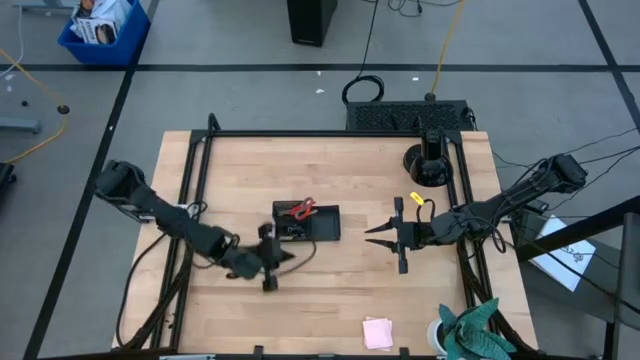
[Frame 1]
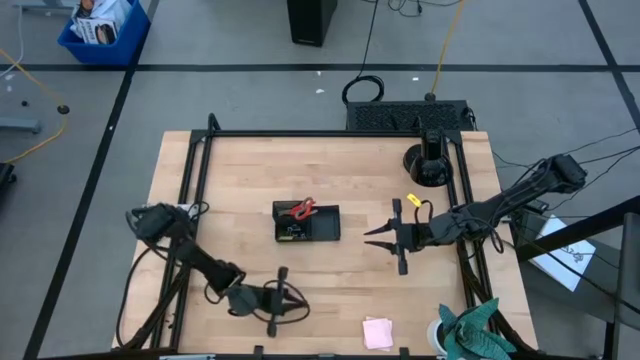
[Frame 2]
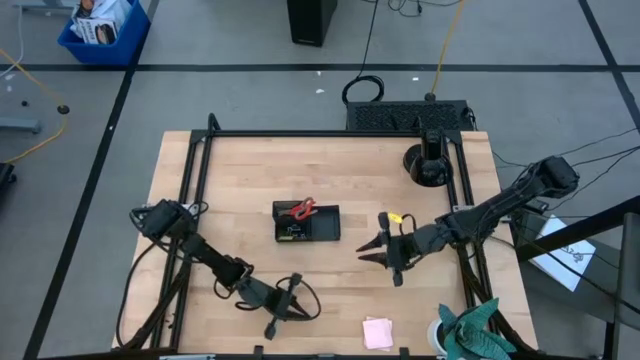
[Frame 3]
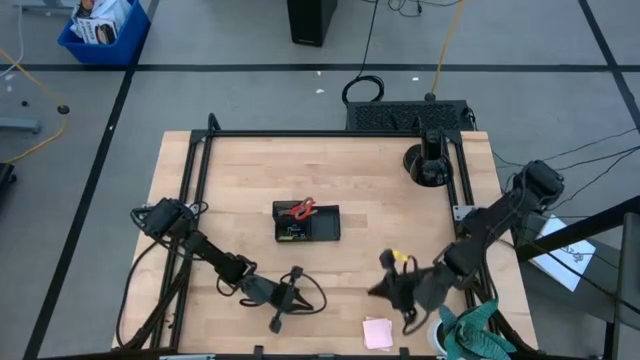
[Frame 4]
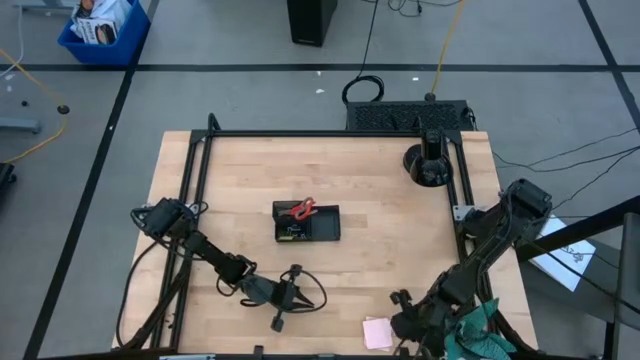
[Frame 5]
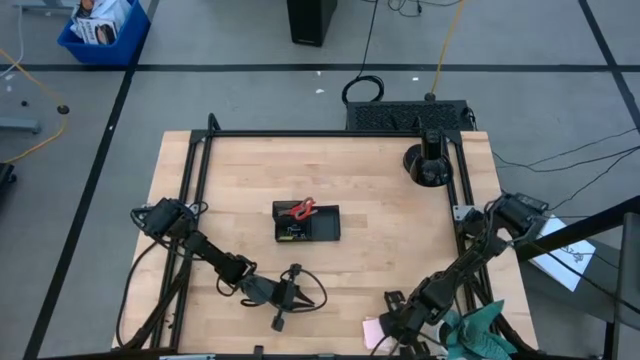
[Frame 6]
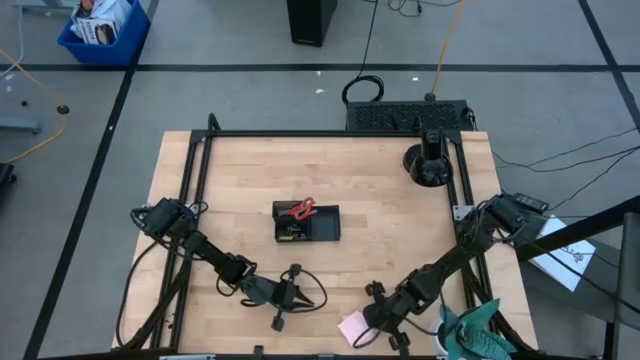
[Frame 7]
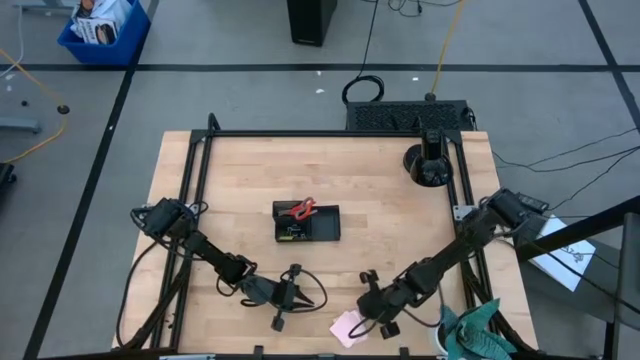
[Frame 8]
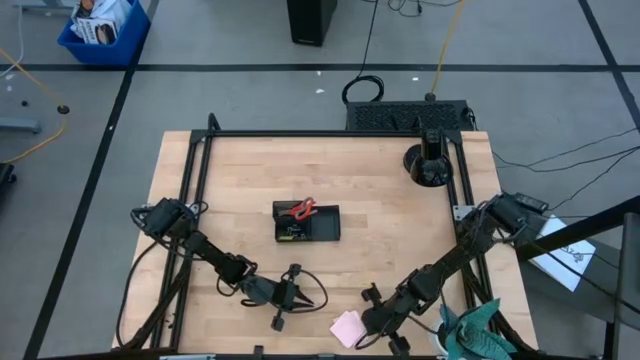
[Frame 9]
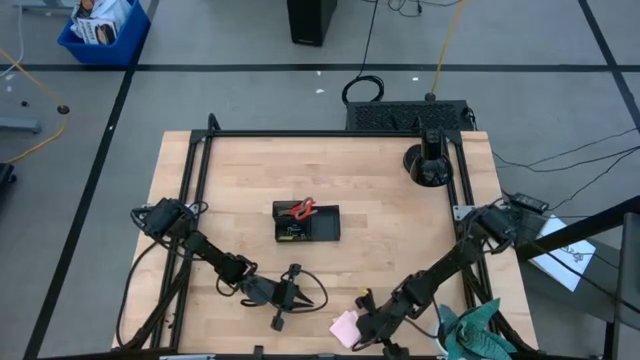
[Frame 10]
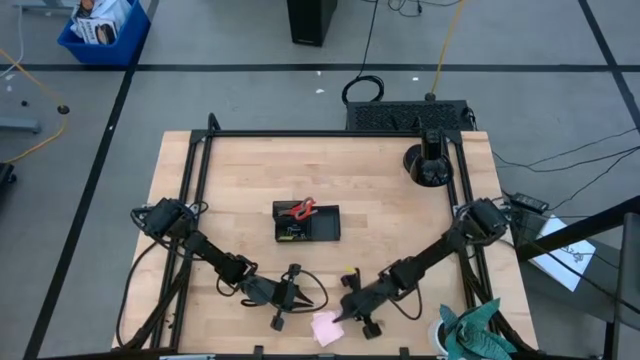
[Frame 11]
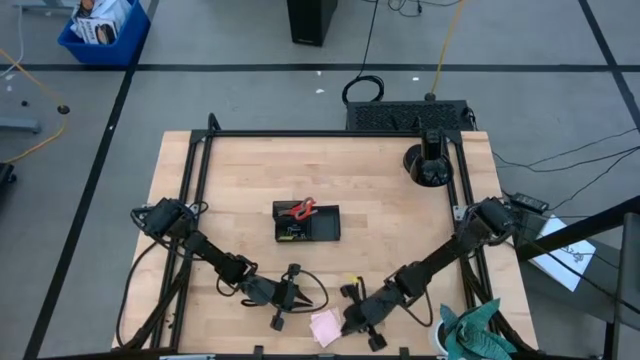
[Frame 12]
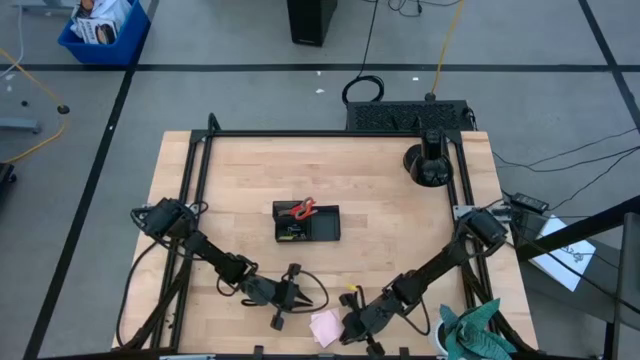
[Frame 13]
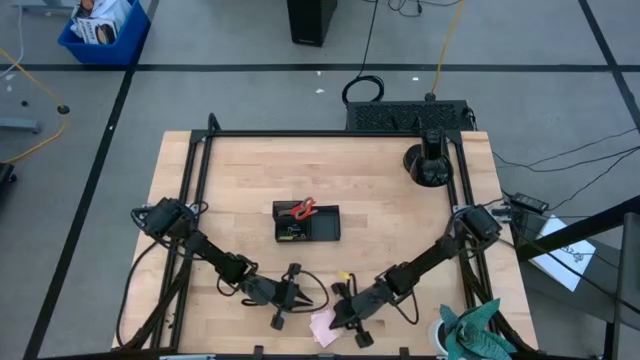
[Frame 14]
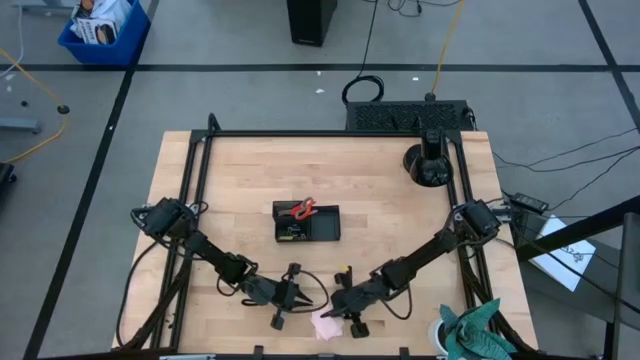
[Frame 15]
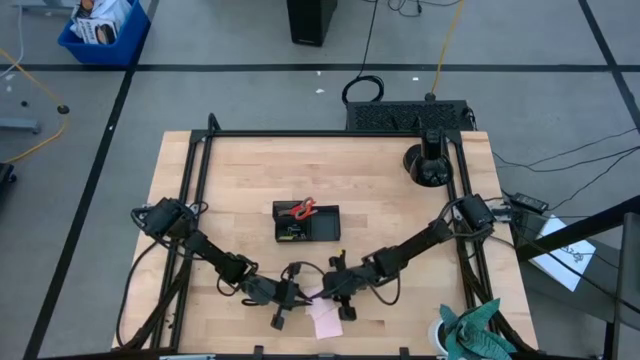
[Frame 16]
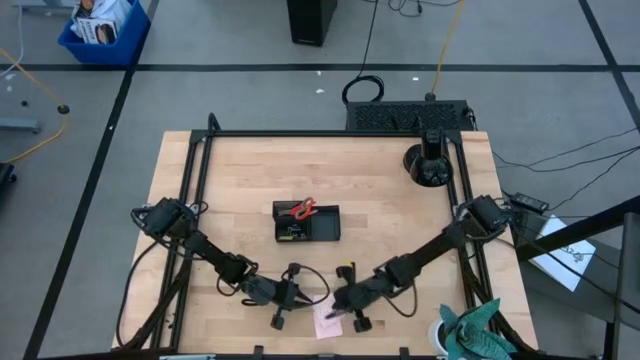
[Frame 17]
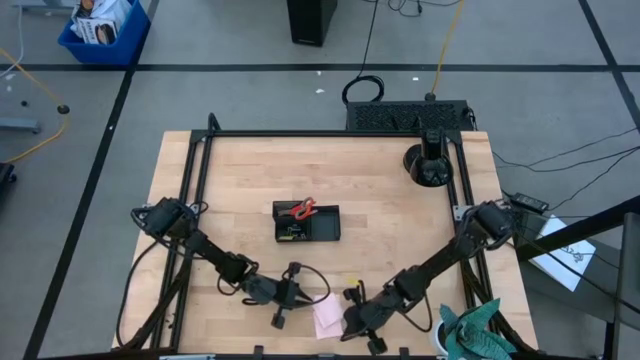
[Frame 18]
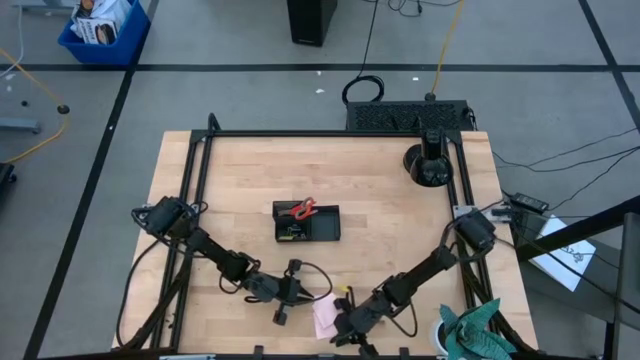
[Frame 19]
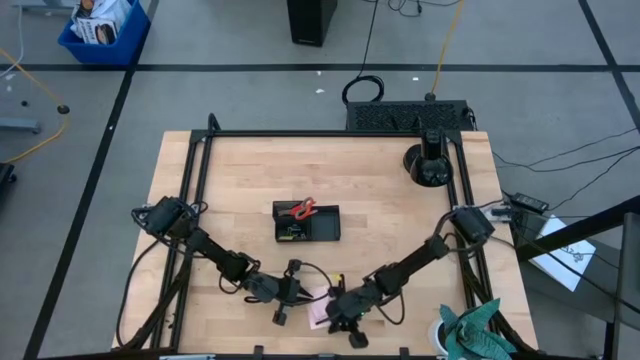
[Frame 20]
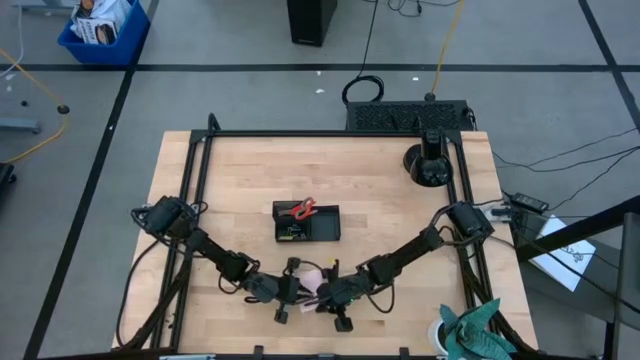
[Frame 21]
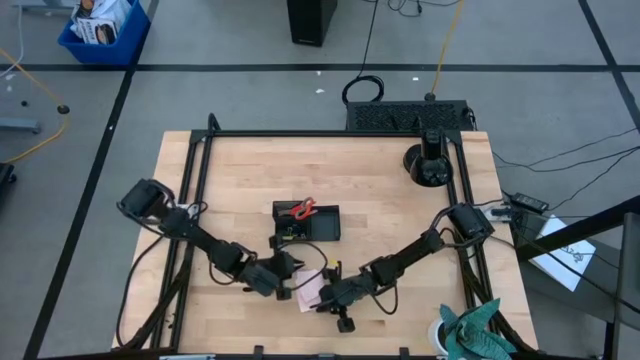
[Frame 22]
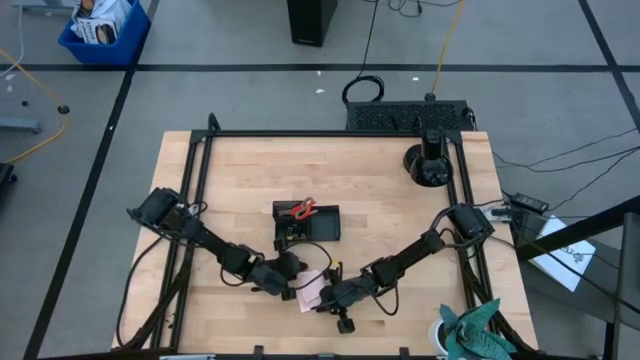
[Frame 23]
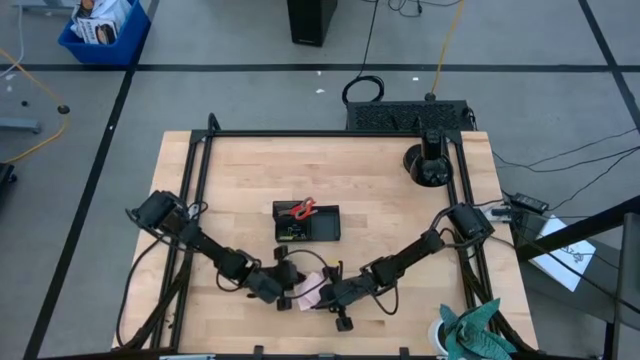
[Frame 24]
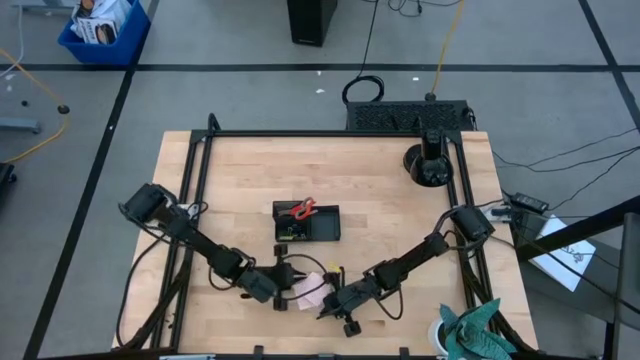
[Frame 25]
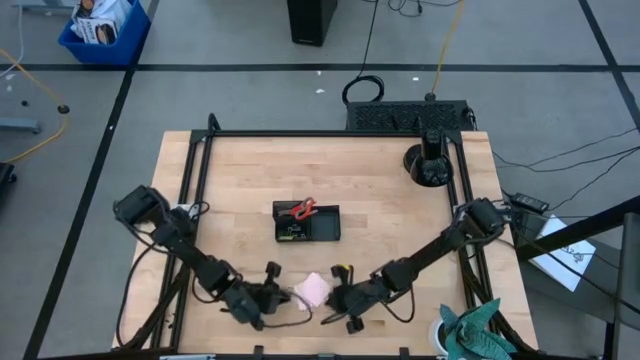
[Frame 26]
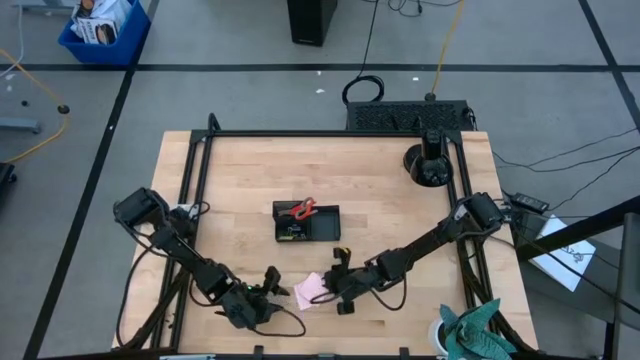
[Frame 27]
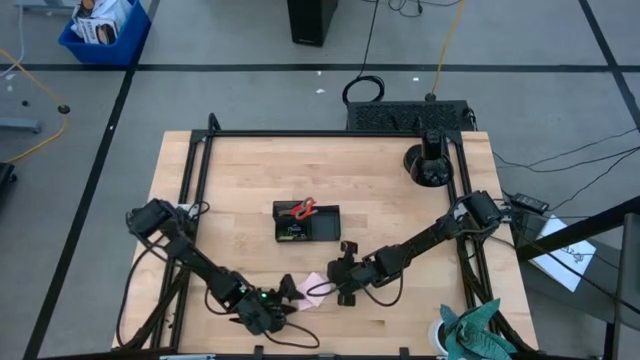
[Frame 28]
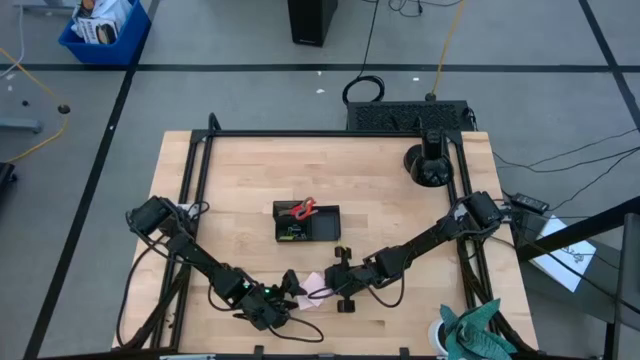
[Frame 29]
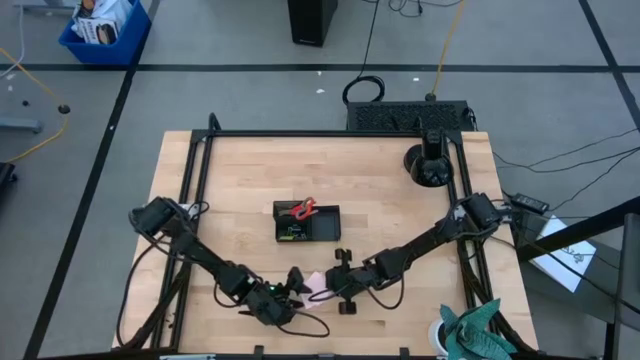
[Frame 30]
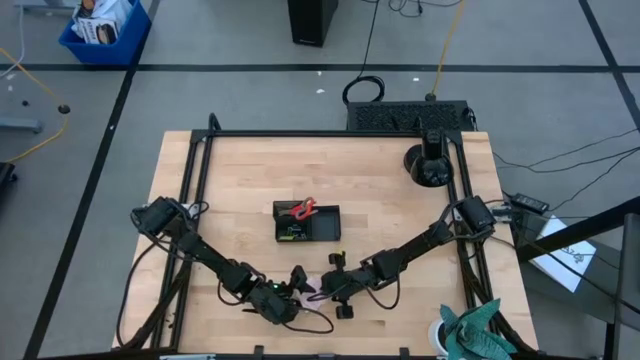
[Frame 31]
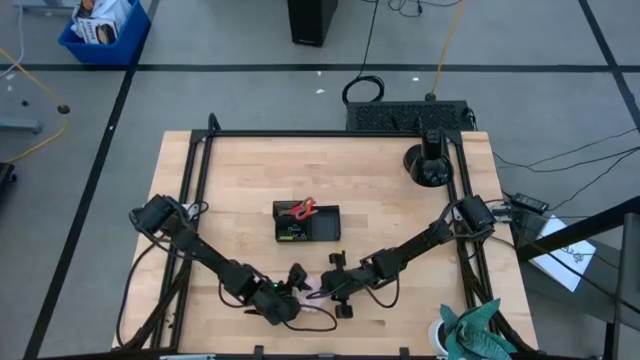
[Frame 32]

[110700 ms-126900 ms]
Task: Pick and place office supplies into organizer
Put the pink sticky notes into the black desk organizer

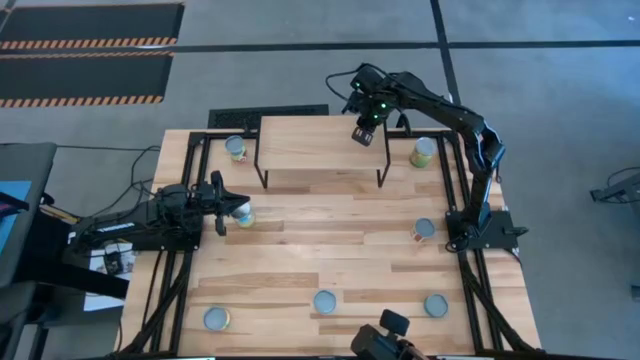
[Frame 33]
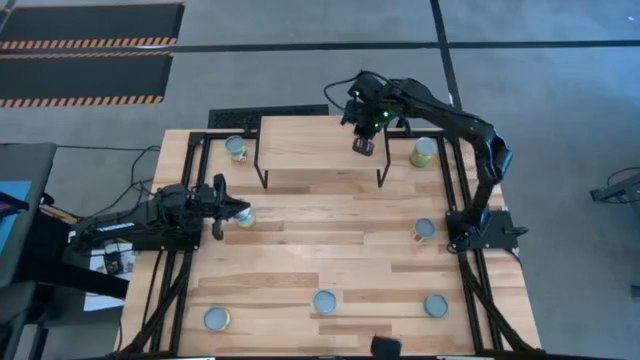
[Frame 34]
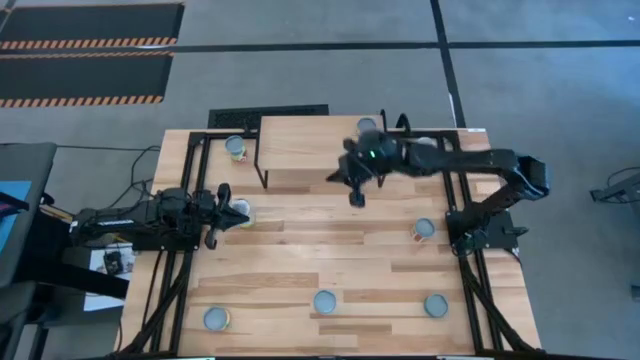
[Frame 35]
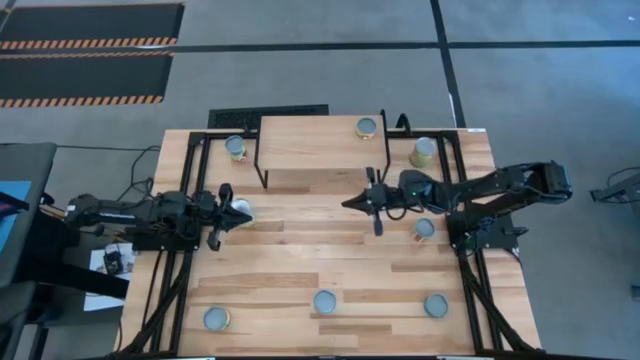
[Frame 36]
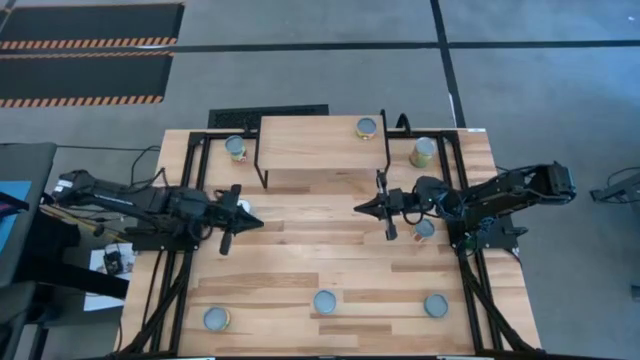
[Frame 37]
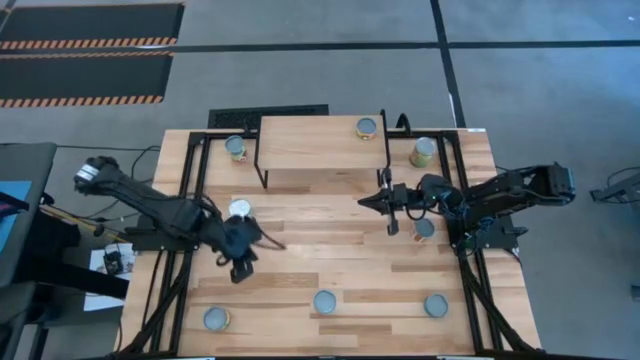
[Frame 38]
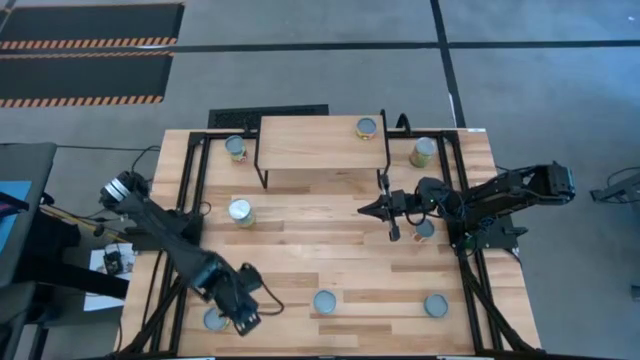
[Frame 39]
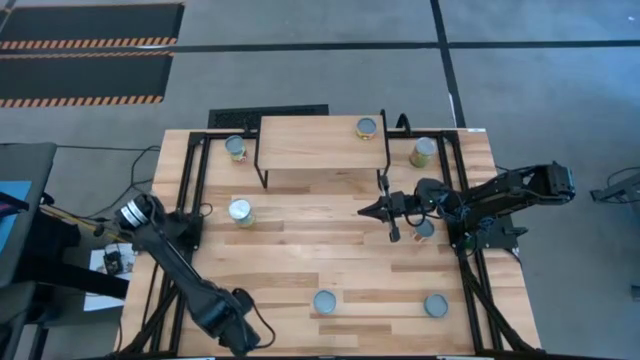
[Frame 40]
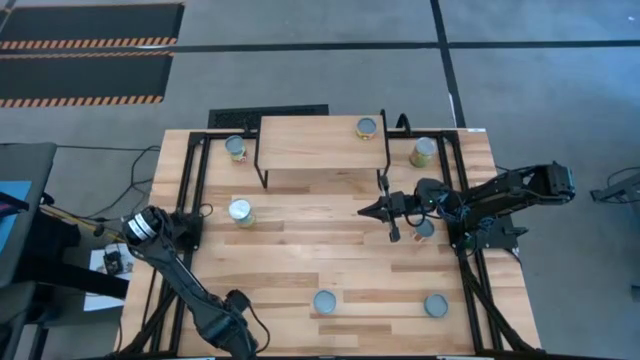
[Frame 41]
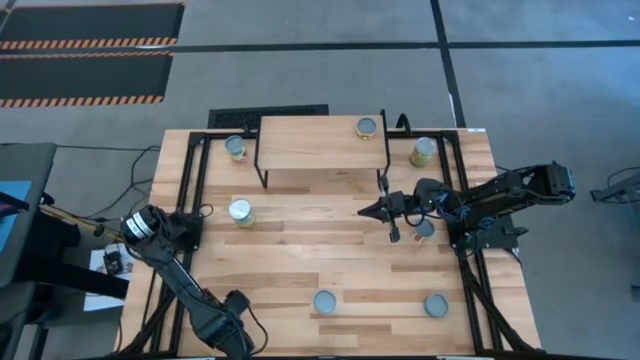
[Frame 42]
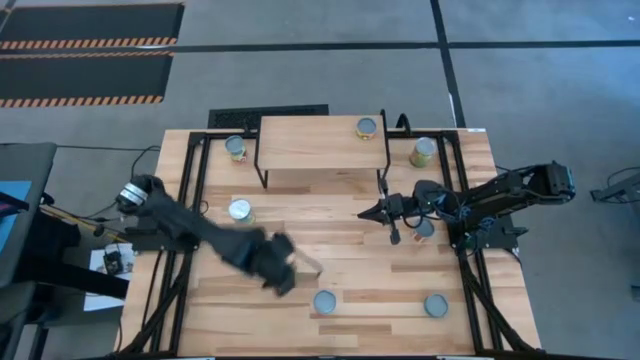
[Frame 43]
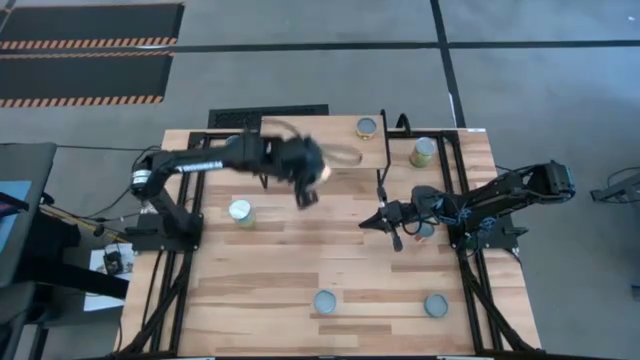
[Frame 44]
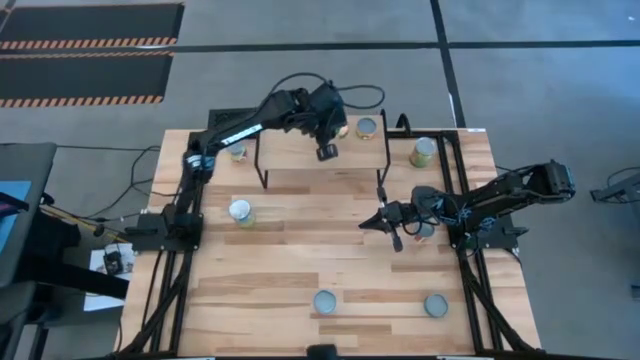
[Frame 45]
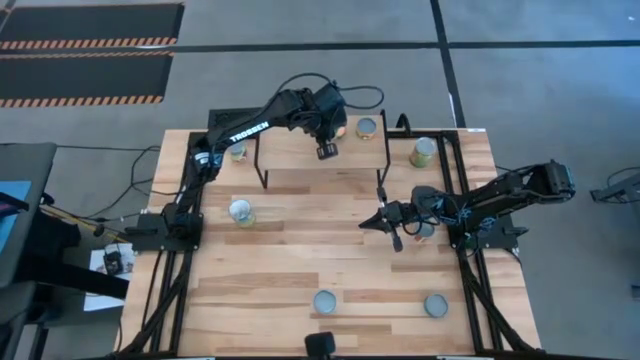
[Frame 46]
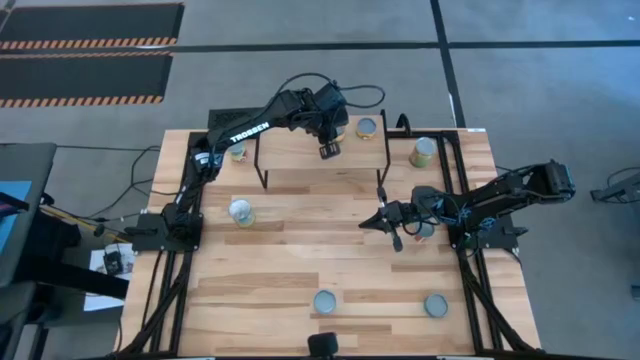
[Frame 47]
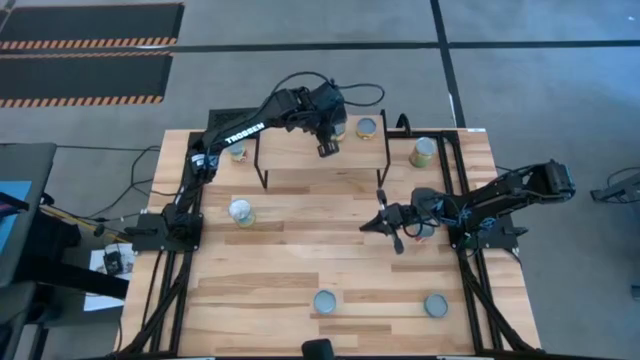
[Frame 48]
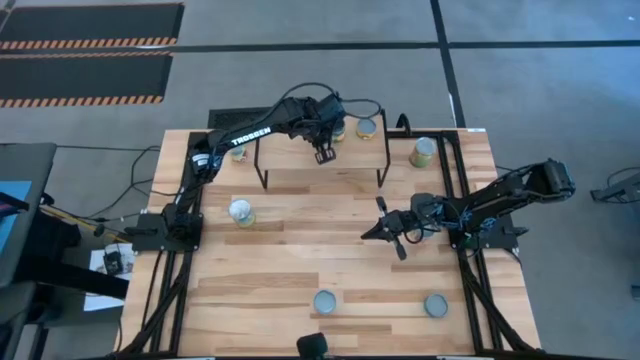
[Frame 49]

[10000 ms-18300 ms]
Task: Pick and place cans onto a shelf
Put the canned peach on the shelf
